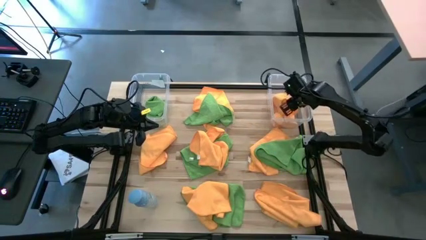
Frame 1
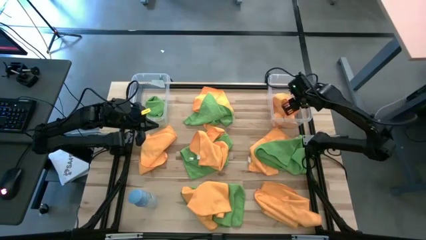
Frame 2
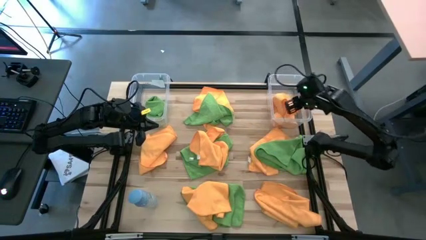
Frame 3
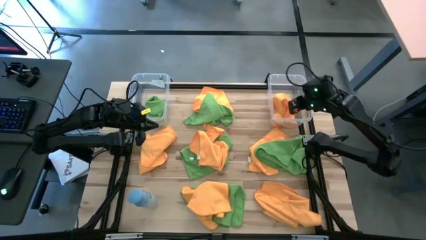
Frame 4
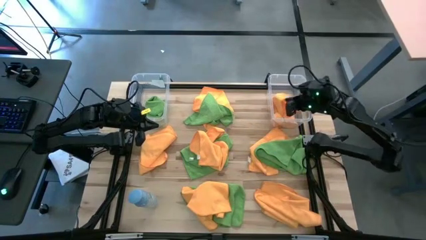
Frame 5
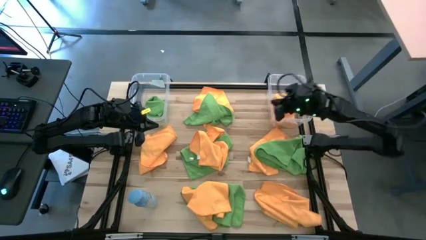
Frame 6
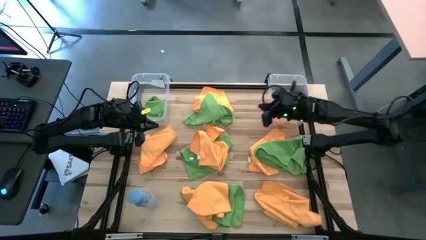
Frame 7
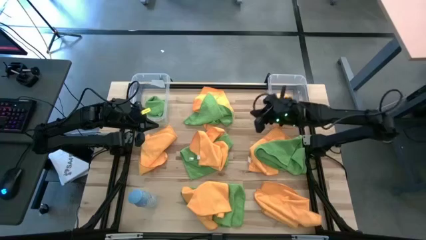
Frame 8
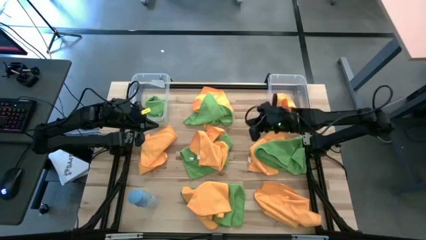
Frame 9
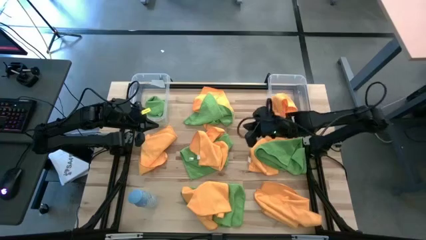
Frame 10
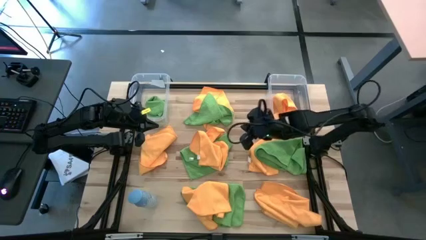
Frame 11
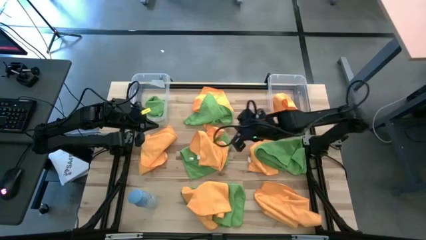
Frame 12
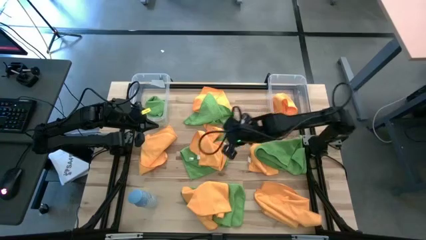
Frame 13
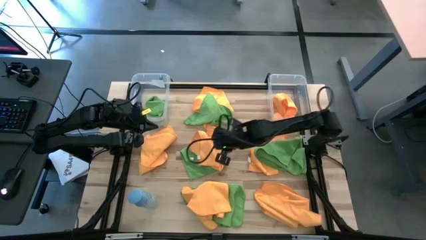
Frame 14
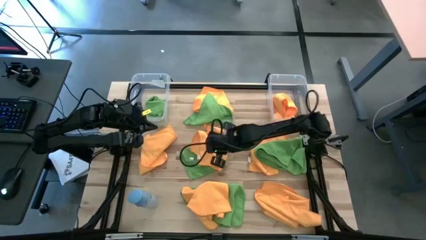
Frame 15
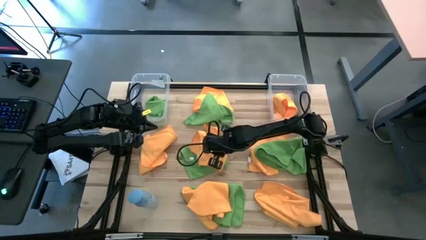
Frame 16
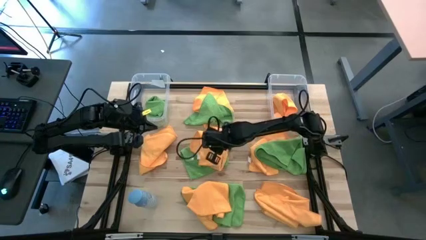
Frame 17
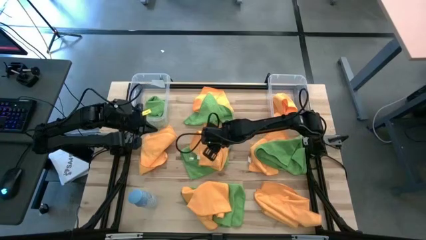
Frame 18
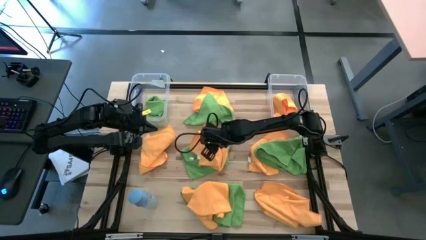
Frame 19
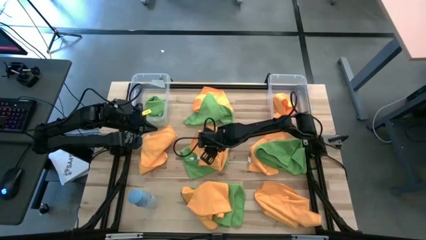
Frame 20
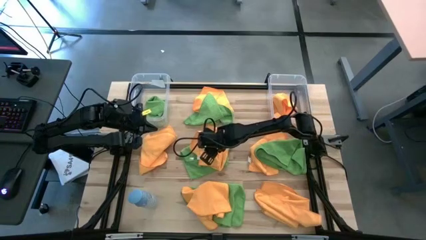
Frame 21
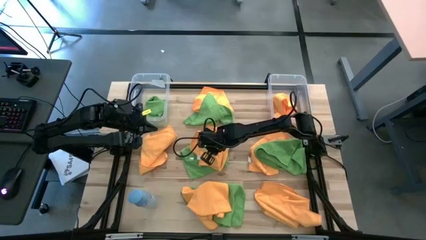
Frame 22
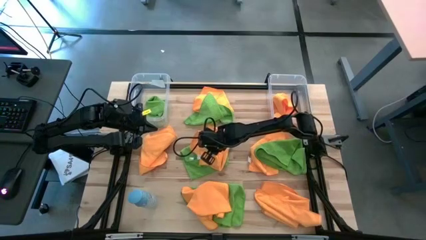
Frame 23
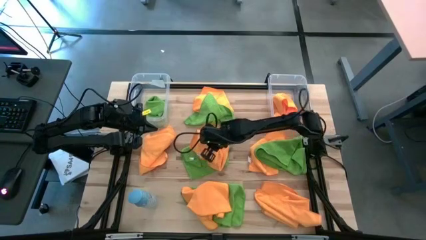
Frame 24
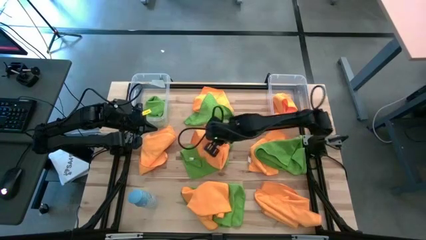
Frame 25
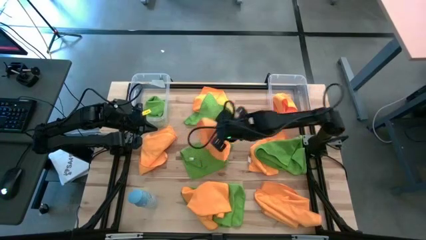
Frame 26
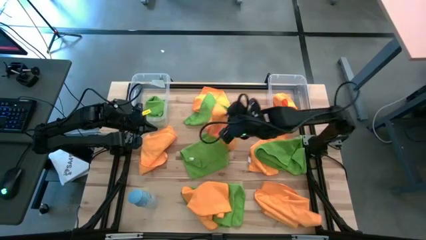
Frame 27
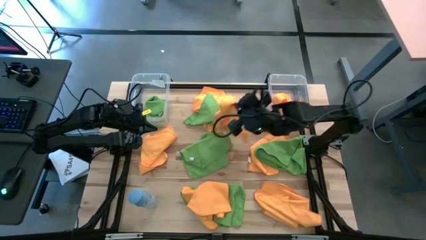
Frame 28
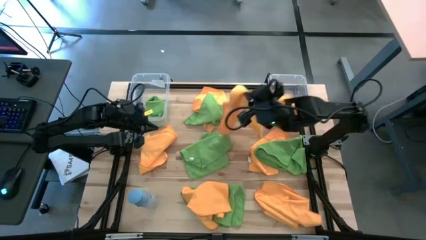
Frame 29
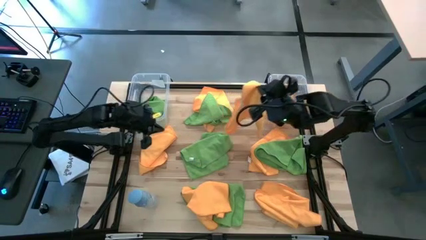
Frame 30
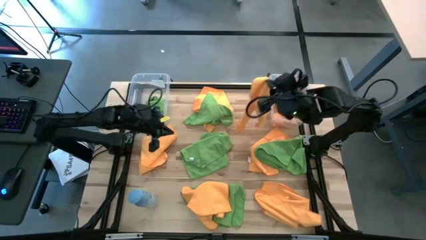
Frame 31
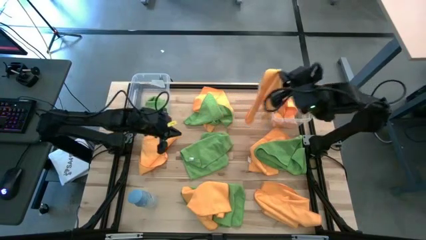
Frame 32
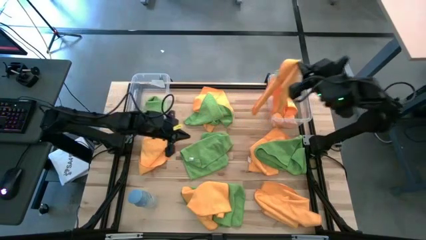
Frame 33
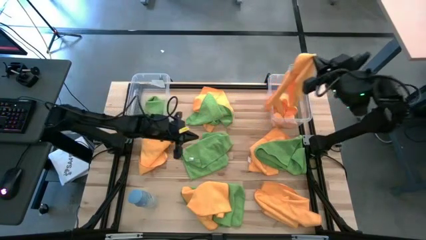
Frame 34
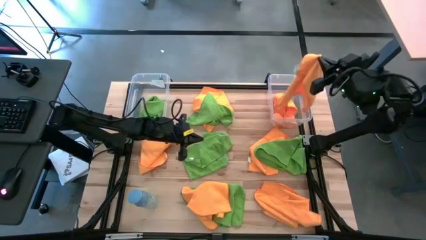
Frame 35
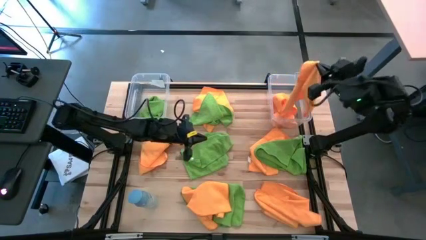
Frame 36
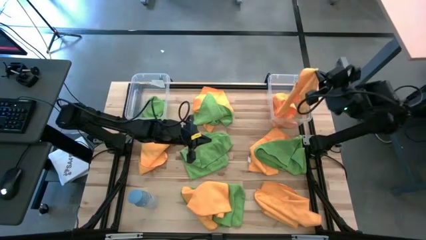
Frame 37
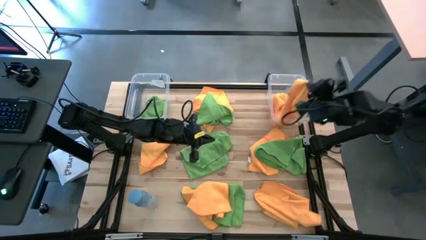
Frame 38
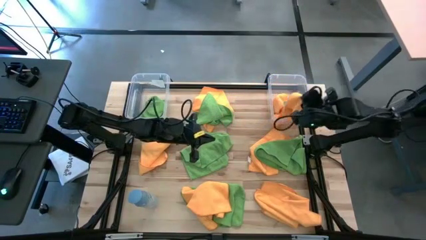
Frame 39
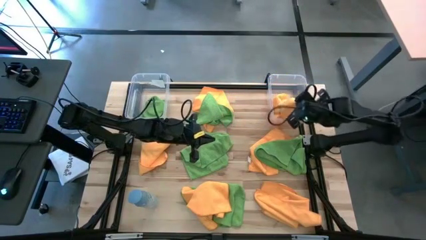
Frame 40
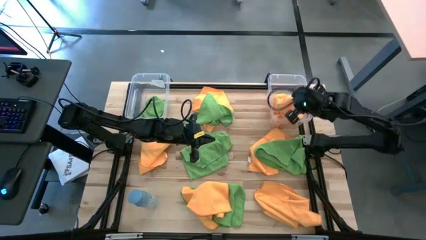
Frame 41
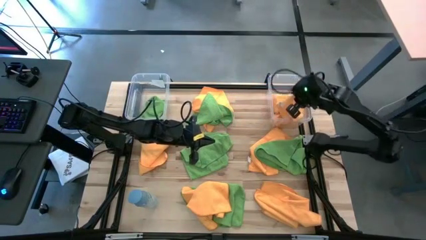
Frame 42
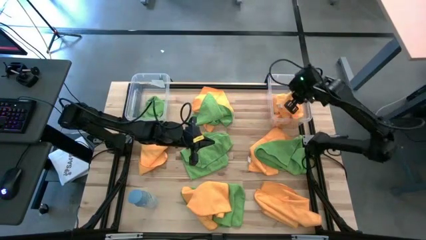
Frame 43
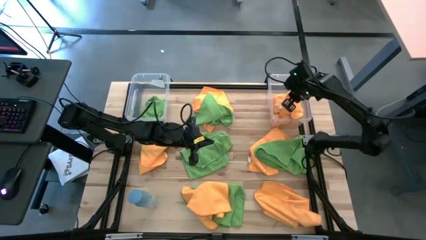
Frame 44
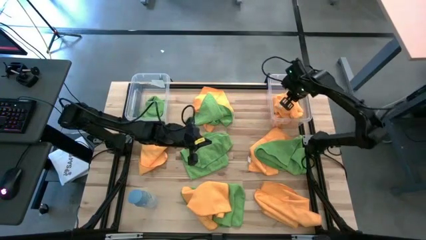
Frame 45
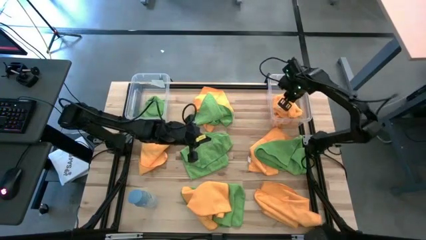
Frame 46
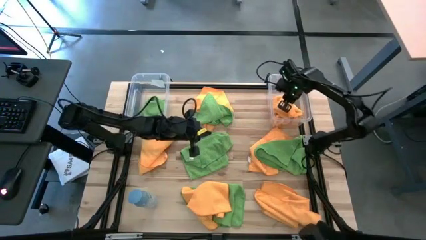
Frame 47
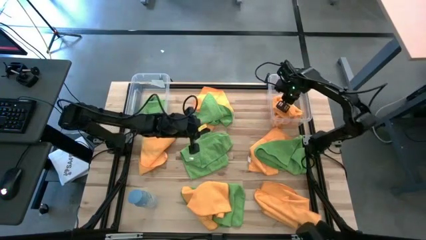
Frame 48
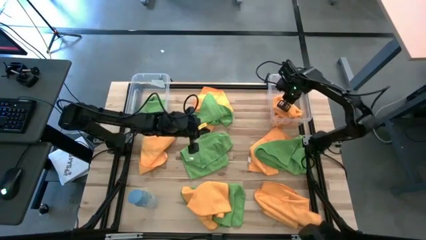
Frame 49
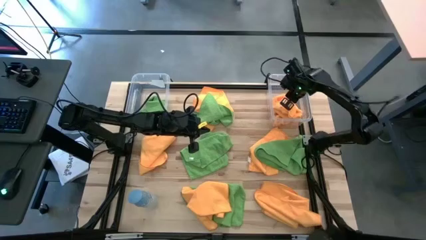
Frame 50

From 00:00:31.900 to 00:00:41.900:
Task: Sort microfiber towel by color & place in baskets
Put the orange microfiber towel into the right transparent bin

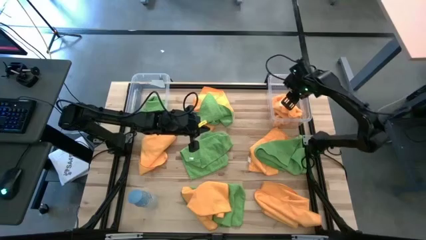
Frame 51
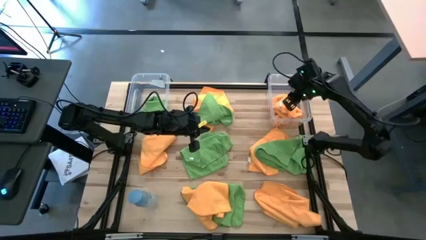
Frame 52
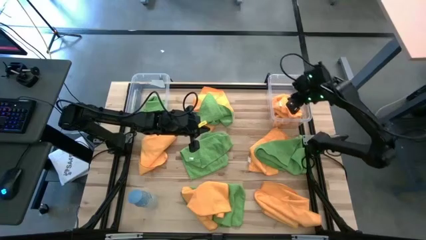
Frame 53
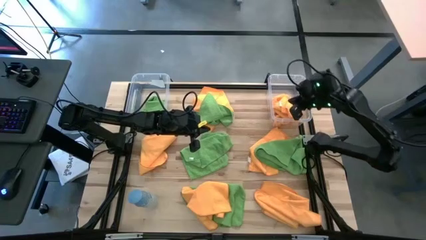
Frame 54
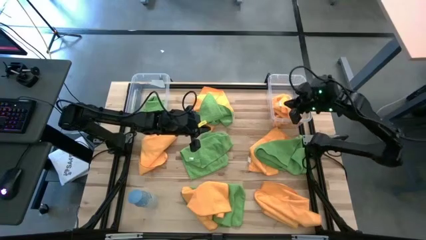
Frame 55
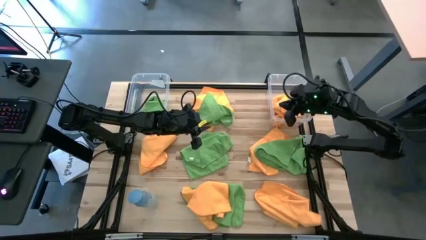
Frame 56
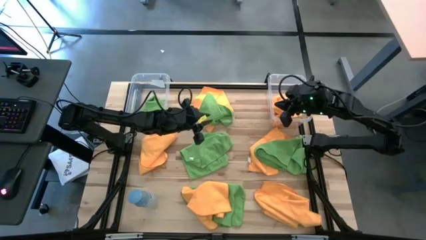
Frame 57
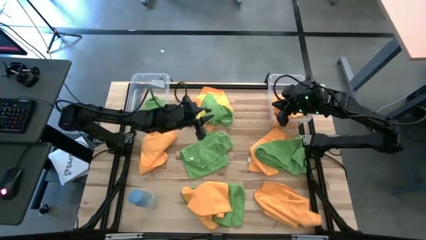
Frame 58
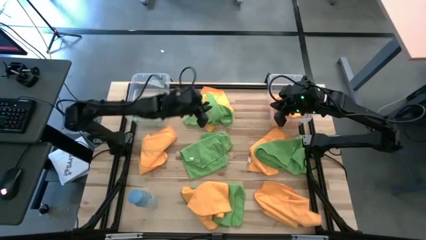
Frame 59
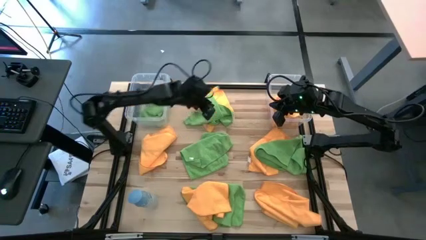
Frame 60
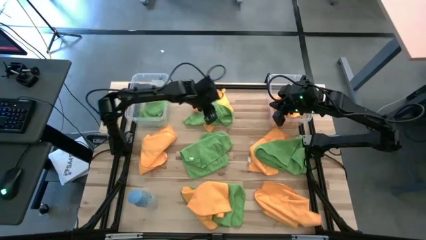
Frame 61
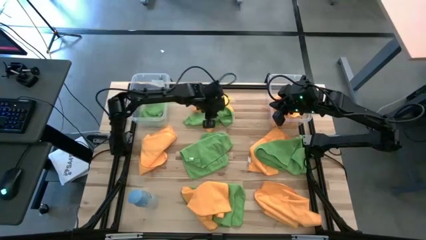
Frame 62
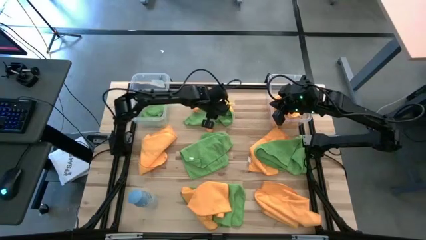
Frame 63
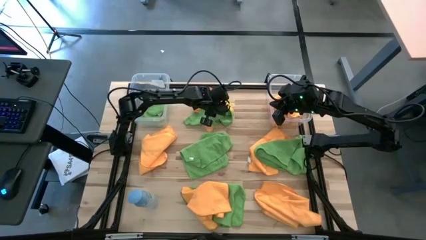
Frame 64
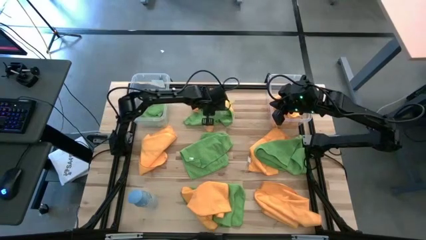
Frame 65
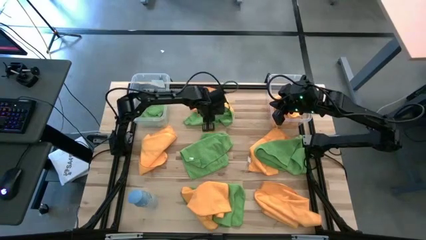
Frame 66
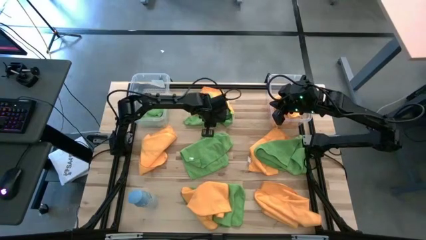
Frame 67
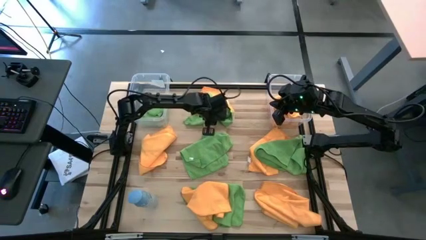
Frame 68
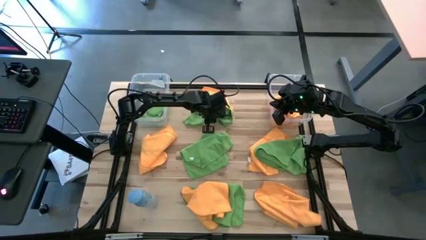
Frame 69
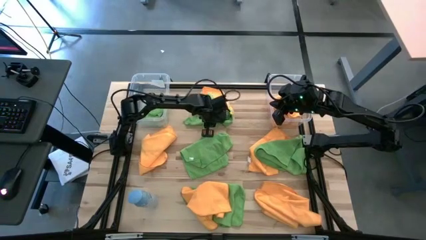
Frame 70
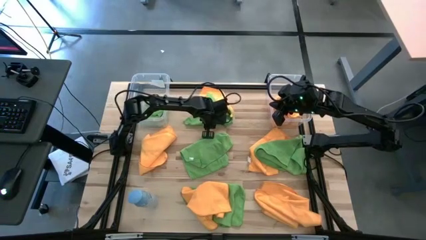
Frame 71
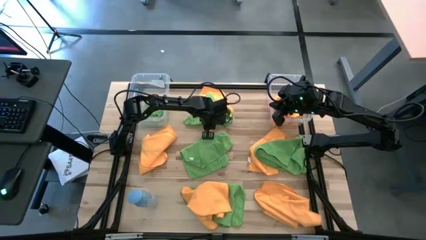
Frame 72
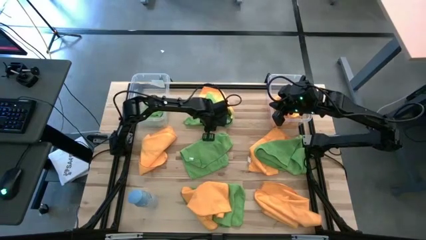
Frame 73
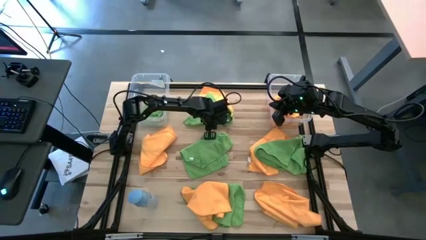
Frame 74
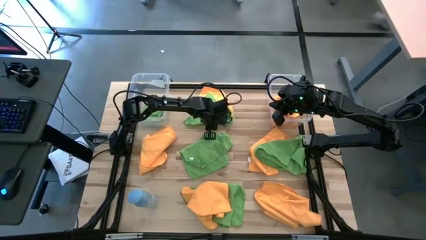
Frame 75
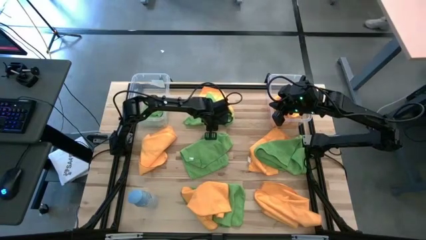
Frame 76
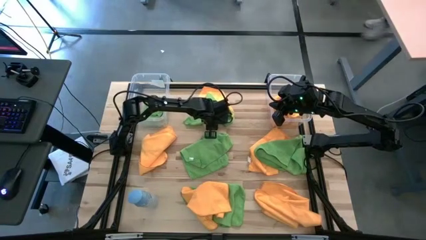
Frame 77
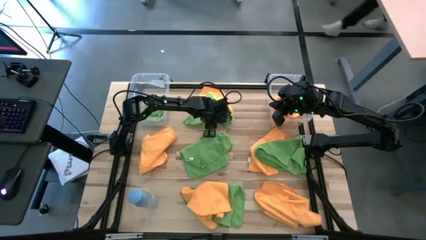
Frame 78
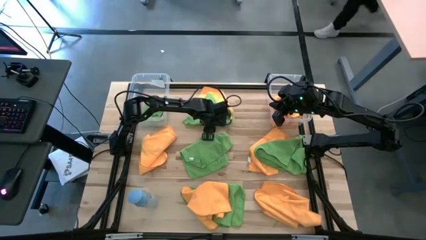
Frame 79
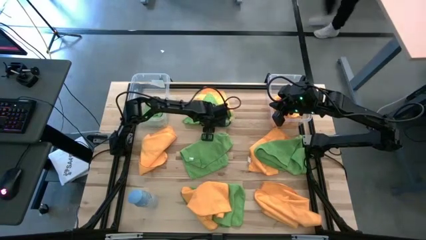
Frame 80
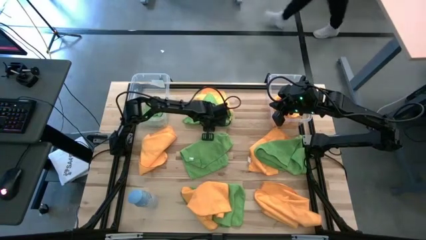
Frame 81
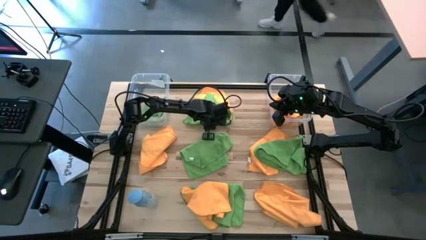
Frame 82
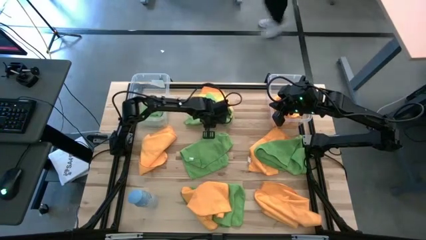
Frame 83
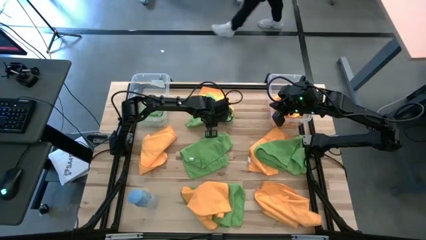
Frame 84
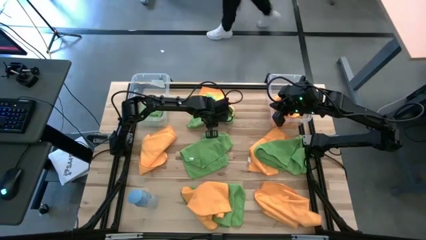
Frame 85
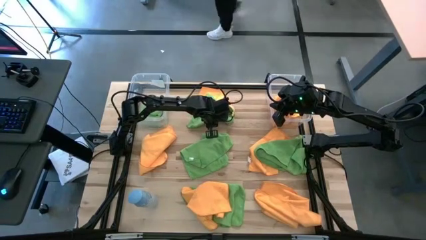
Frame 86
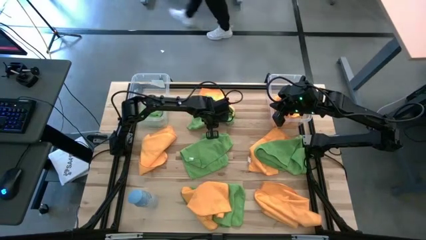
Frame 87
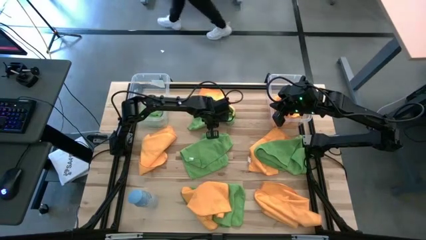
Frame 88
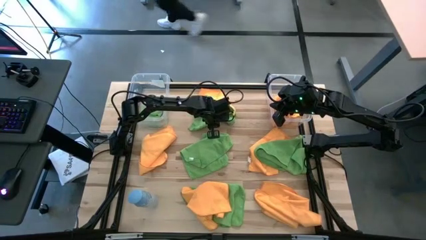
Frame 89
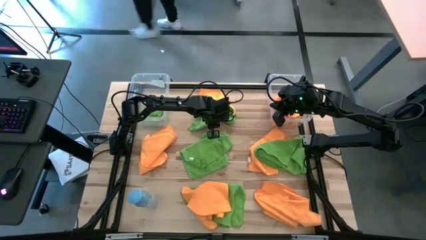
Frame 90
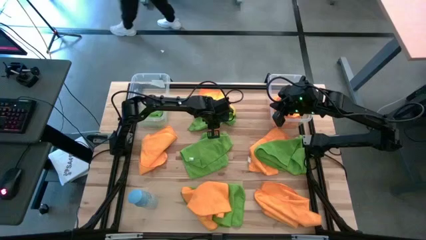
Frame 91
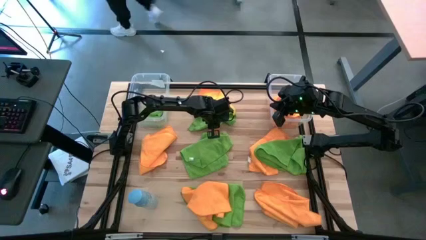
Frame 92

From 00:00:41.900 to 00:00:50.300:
Put the green microfiber towel into the left transparent bin
